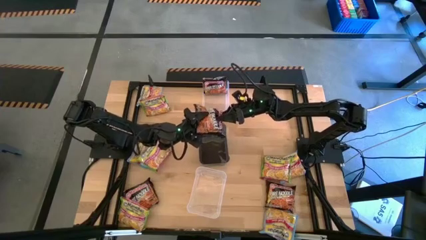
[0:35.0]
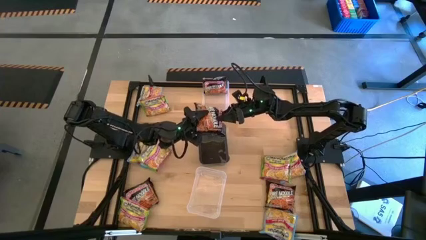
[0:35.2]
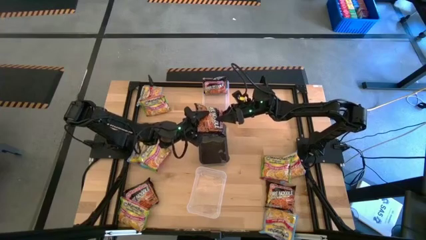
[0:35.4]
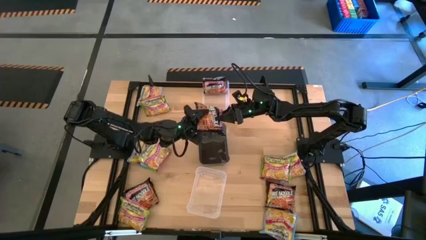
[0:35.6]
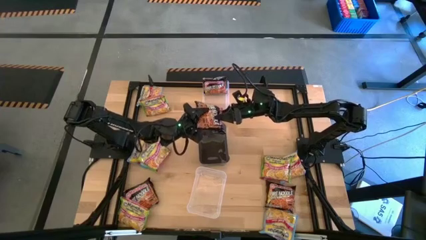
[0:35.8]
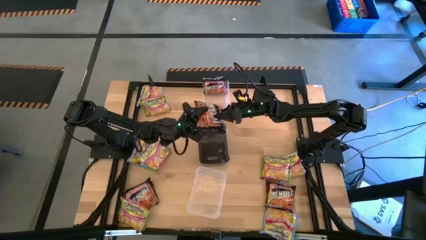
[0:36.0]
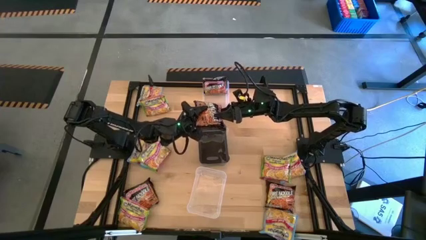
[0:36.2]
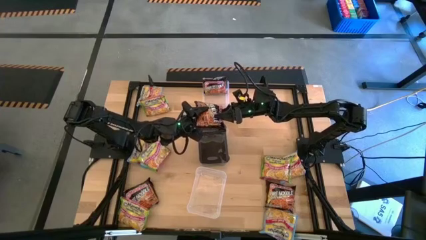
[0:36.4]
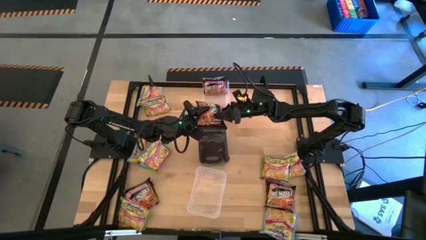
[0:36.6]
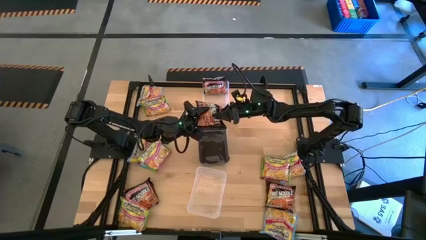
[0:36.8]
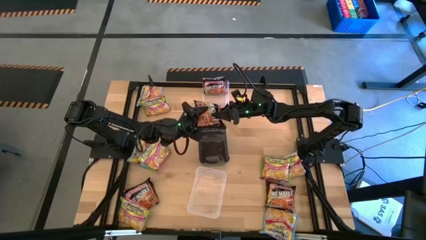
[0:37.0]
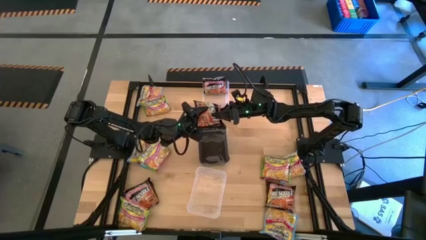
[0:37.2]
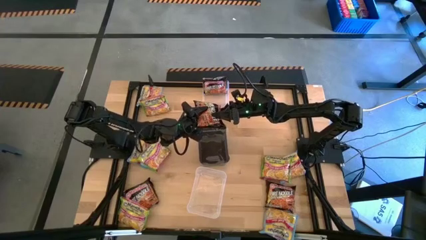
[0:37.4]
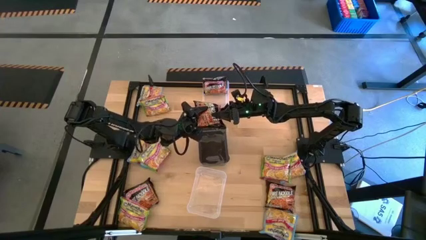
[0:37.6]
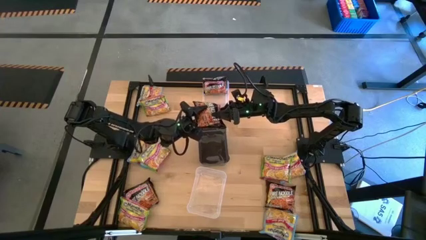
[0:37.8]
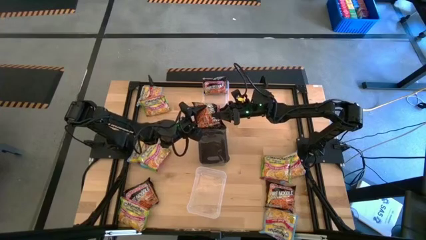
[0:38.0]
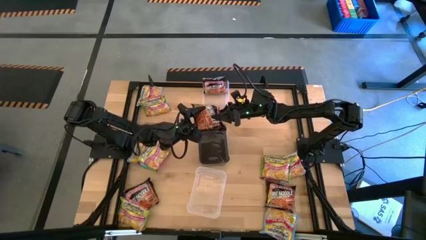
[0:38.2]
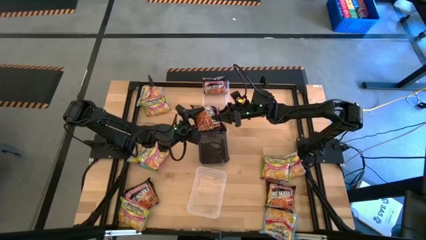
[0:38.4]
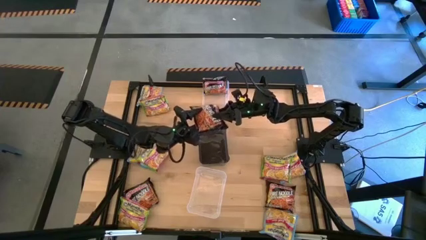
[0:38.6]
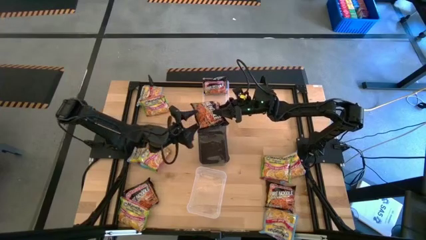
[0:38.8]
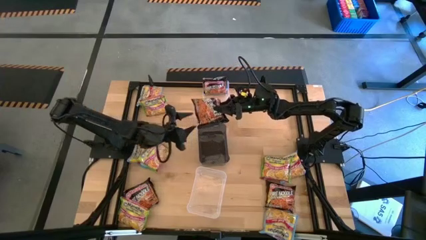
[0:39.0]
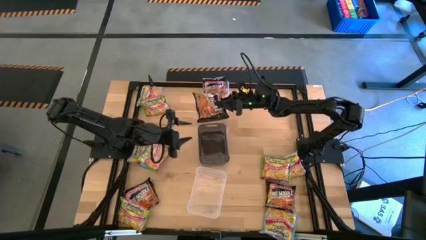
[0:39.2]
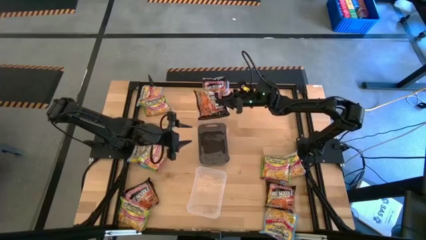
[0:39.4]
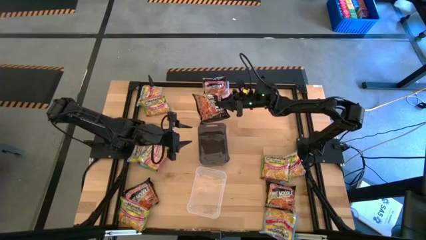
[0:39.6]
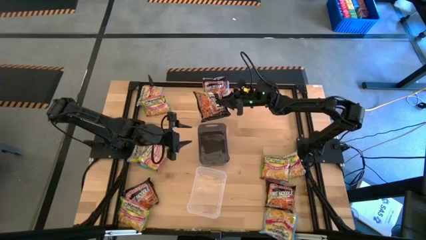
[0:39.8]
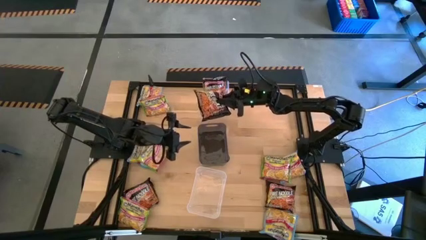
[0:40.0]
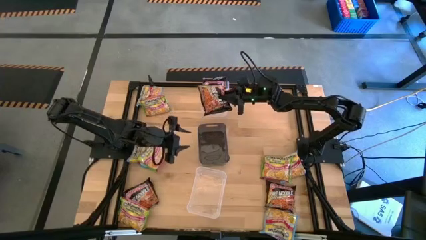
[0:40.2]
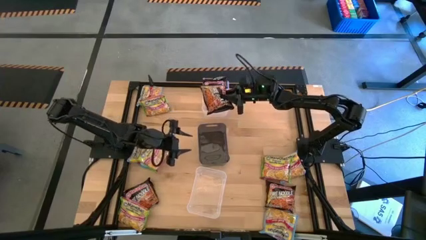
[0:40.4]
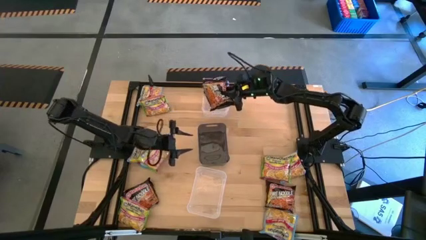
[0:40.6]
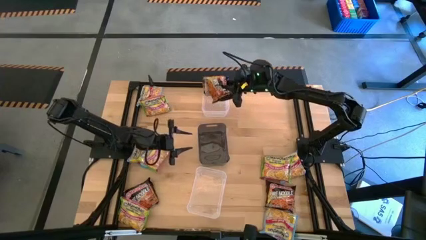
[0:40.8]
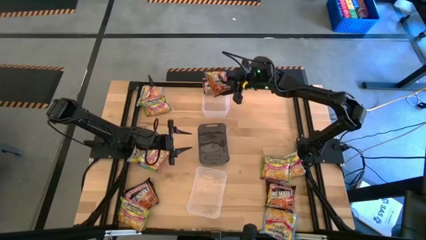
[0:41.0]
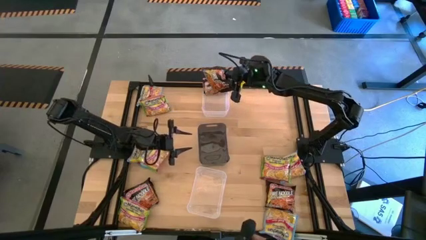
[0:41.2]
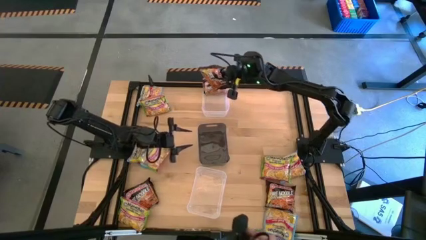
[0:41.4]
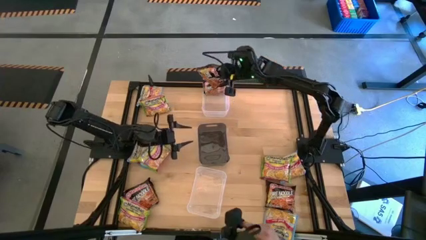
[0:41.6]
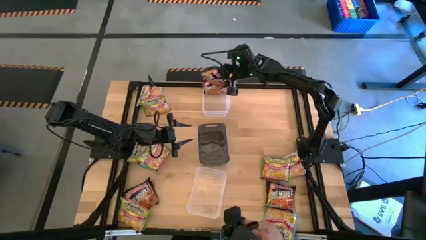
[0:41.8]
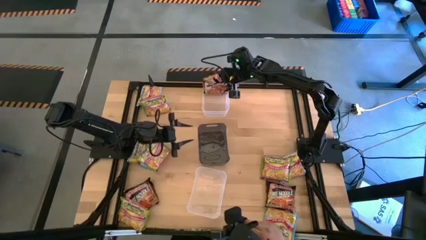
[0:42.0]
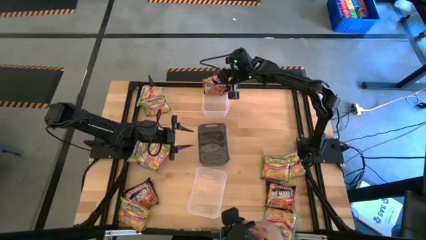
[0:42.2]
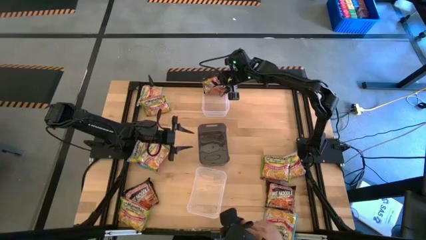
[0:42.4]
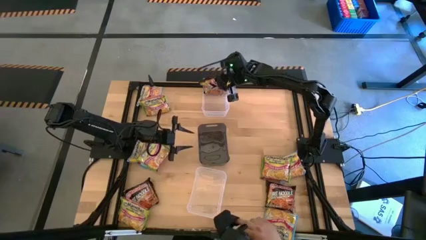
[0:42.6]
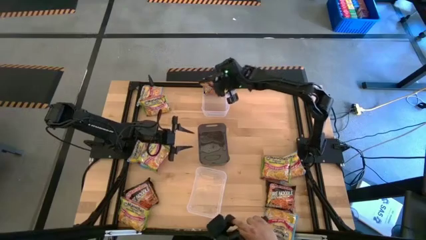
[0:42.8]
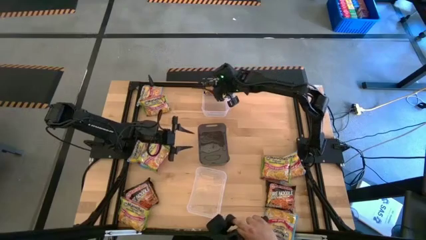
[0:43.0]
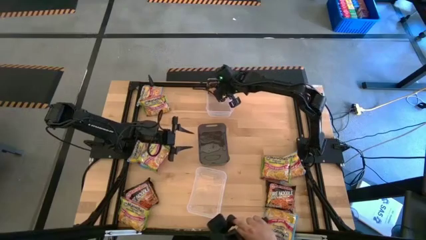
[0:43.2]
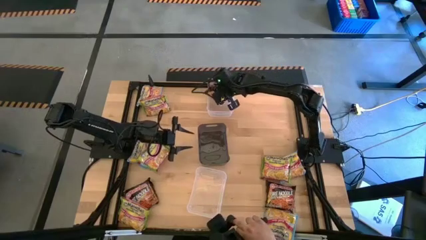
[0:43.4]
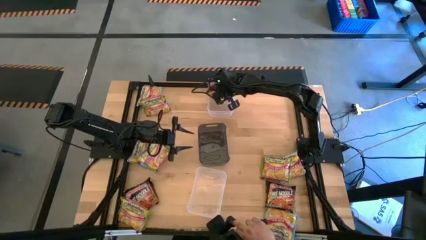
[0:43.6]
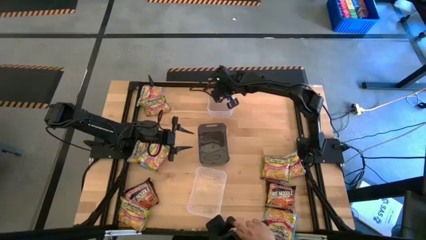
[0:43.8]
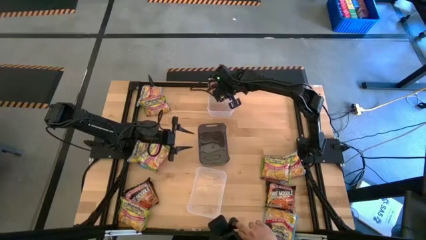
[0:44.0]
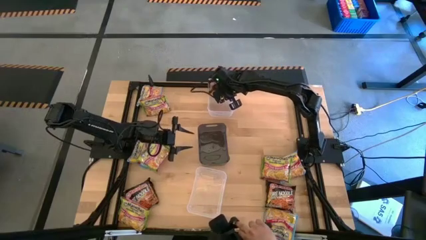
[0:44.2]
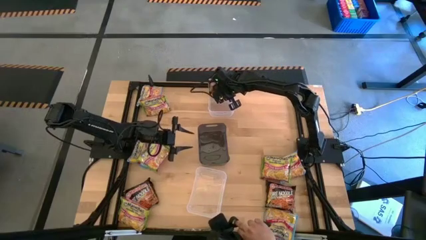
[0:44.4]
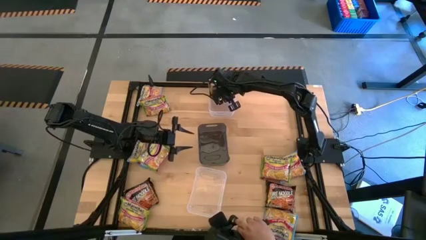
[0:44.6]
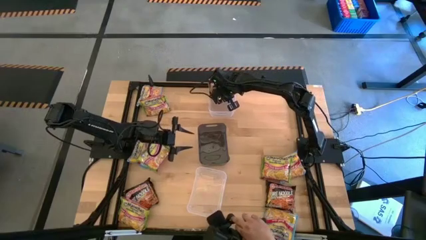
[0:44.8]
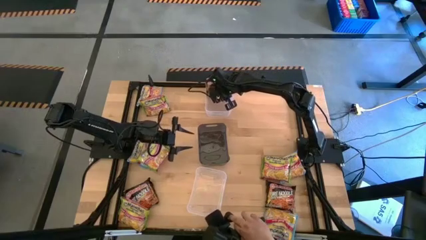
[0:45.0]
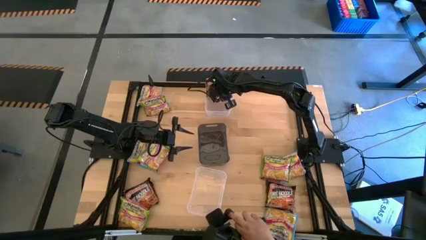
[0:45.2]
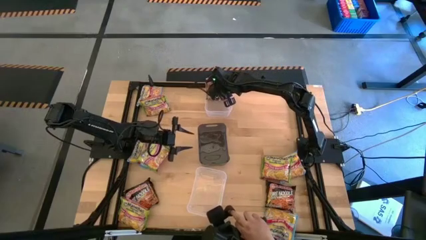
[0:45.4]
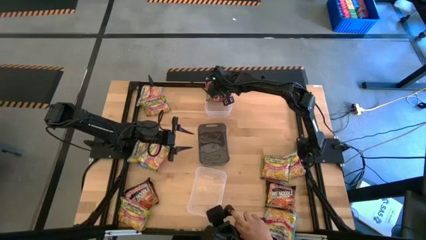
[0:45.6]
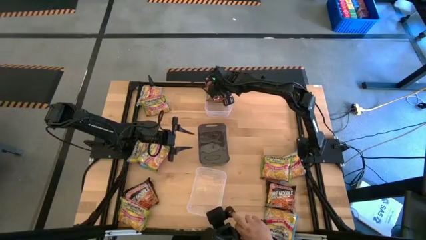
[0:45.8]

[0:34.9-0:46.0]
Task: Sort Maruchan noodles
Put the middle top black noodle pack into the top transparent bin

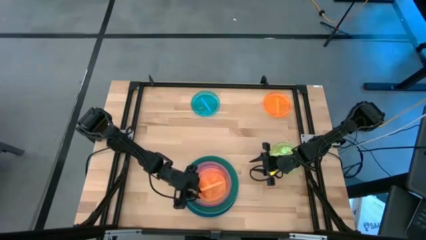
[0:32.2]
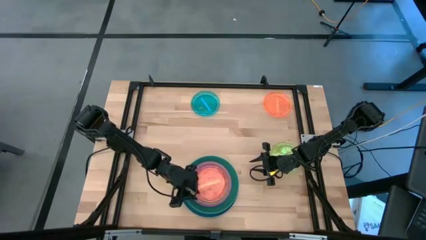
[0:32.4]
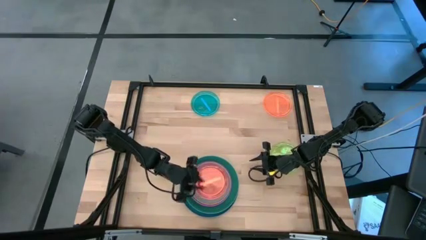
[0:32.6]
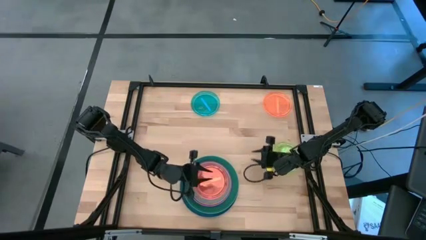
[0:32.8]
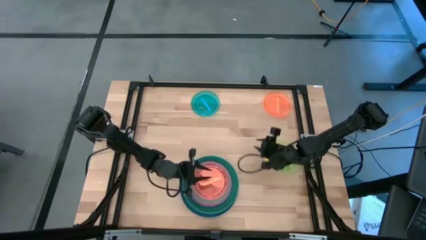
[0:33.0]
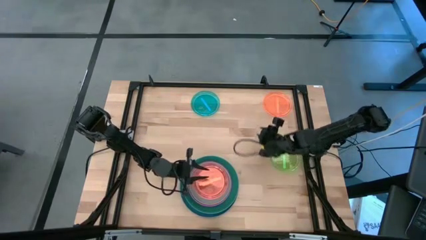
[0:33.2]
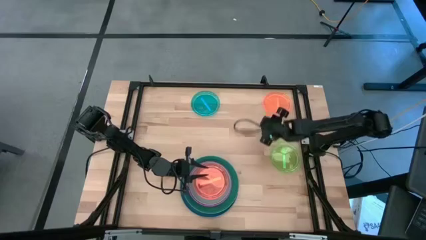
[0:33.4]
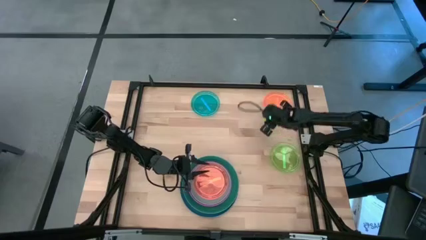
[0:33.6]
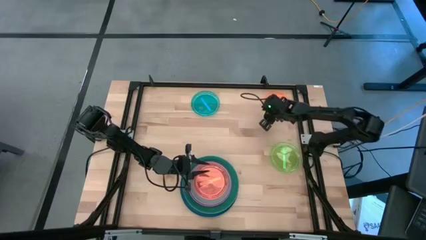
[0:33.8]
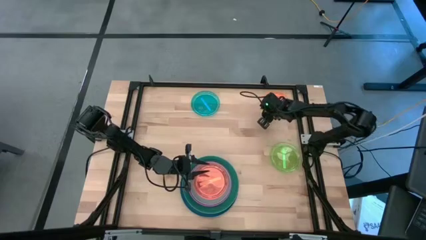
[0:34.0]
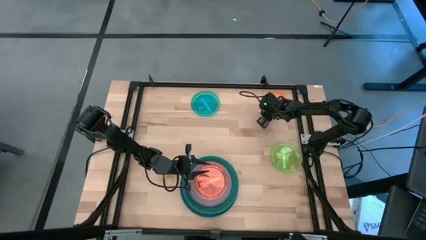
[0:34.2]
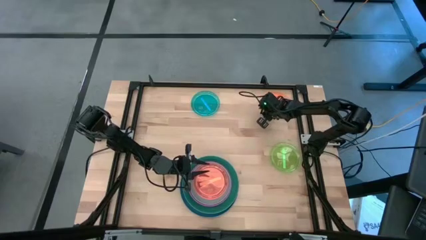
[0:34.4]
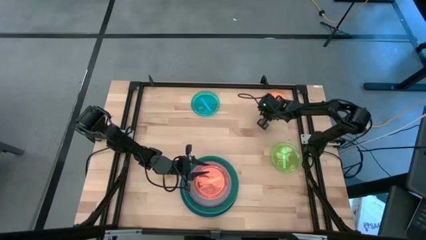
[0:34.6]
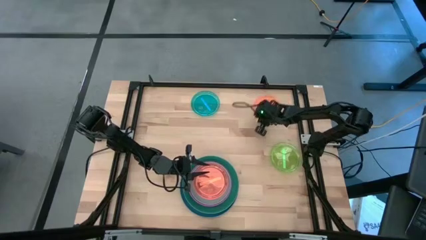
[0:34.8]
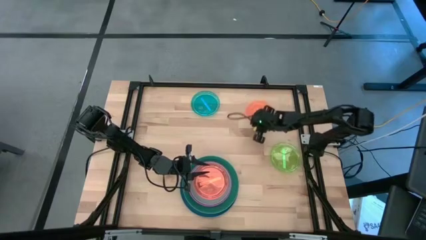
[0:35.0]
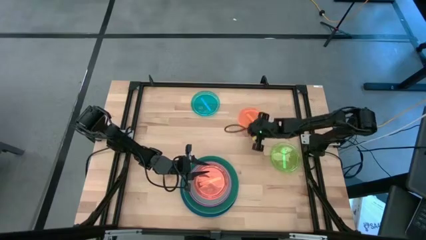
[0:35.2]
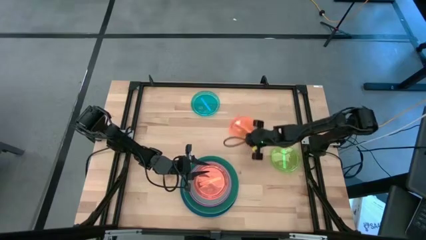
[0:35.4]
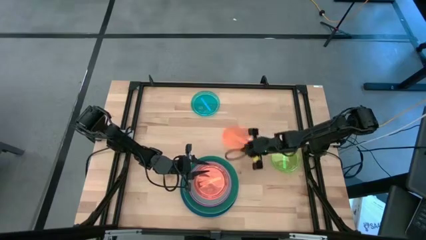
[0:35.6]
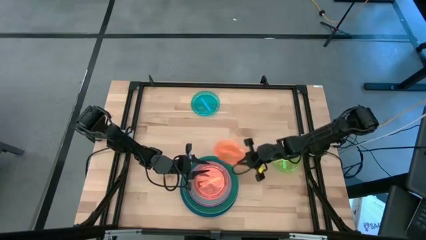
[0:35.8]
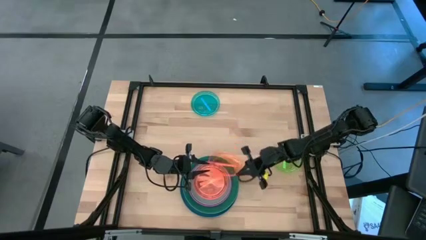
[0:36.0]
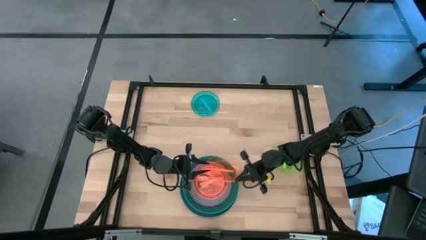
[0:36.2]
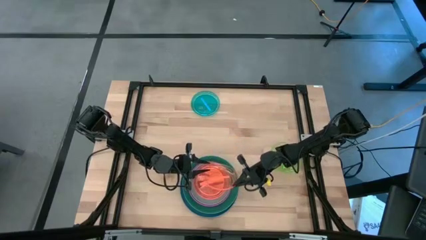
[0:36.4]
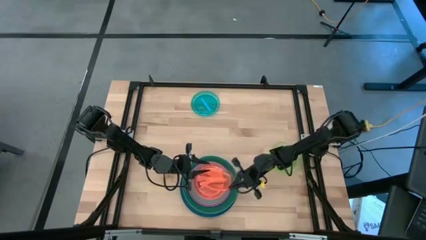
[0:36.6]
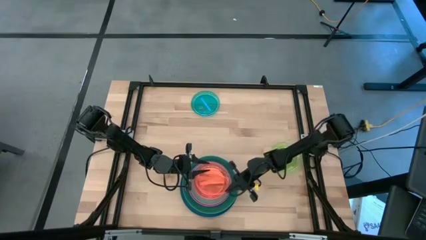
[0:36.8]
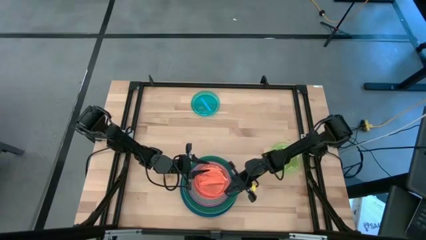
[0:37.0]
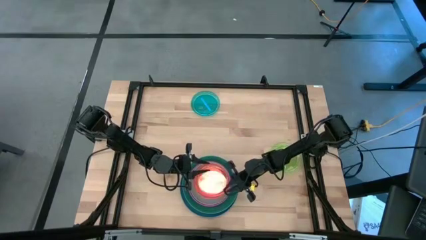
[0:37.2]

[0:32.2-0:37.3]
Task: Stack plastic plates
Stack the orange plate on the orange plate
